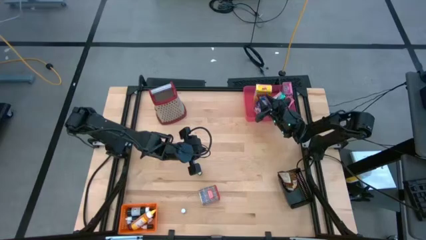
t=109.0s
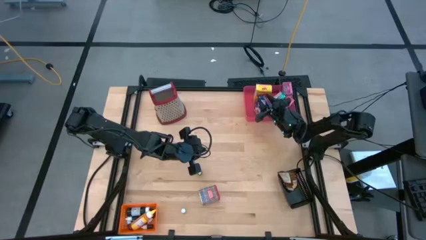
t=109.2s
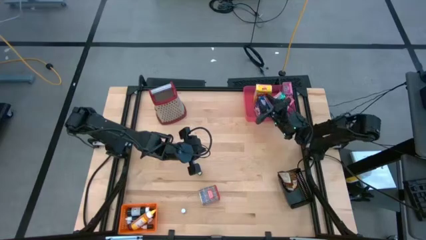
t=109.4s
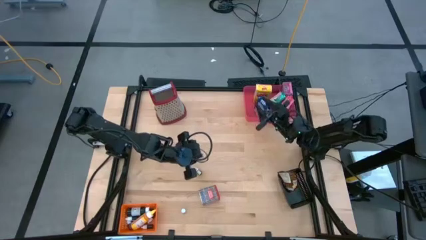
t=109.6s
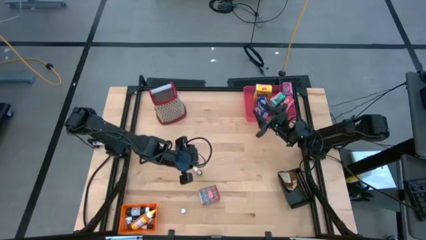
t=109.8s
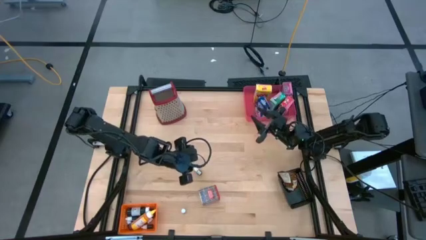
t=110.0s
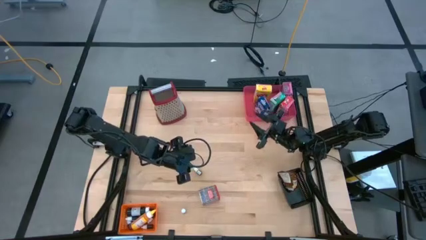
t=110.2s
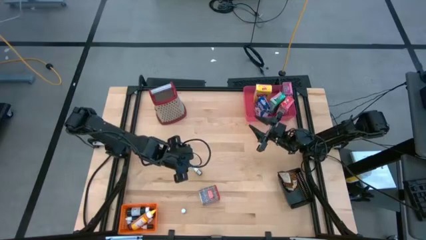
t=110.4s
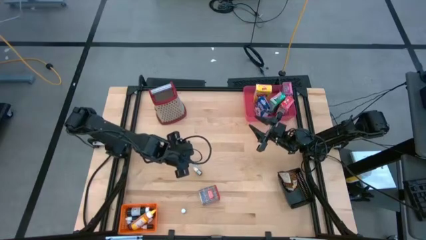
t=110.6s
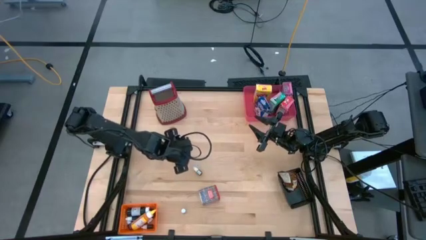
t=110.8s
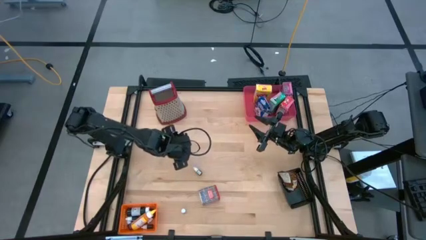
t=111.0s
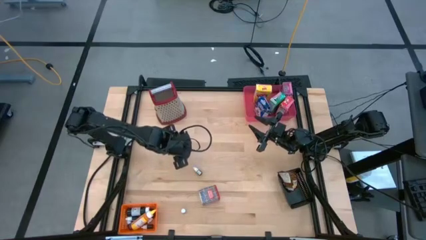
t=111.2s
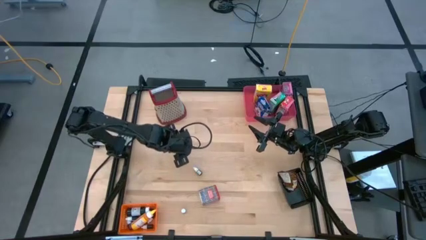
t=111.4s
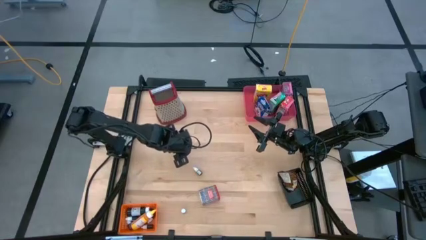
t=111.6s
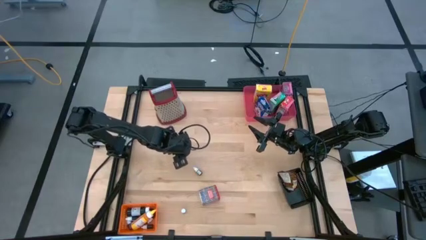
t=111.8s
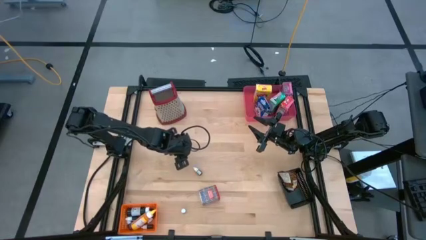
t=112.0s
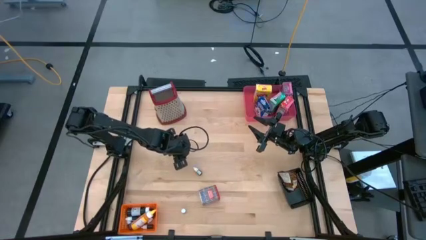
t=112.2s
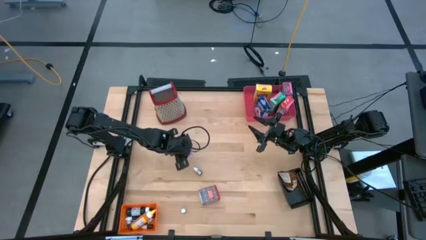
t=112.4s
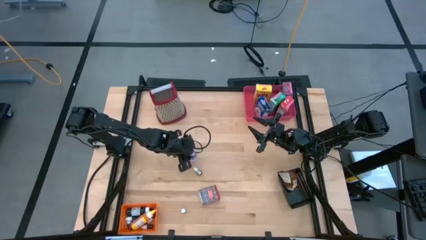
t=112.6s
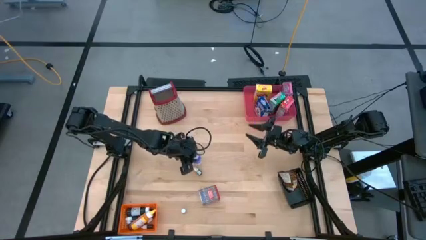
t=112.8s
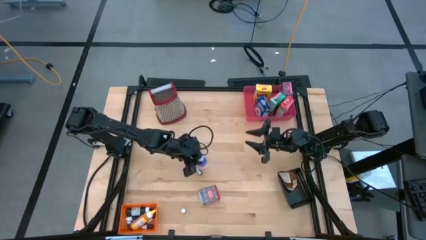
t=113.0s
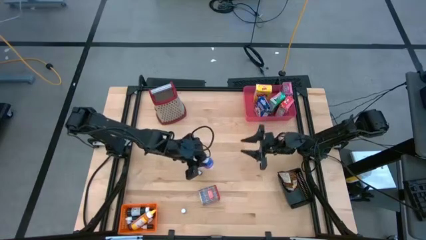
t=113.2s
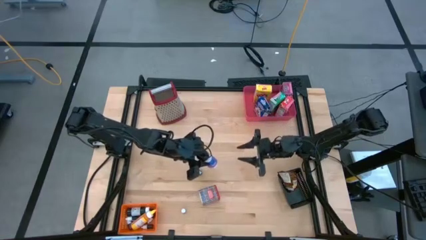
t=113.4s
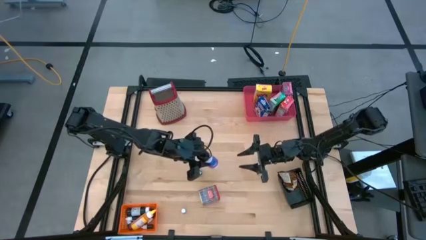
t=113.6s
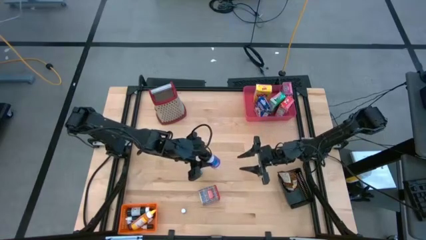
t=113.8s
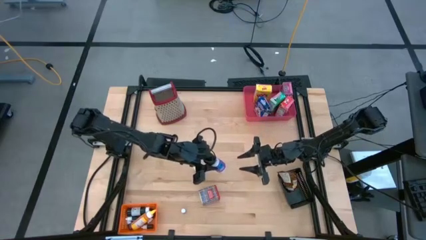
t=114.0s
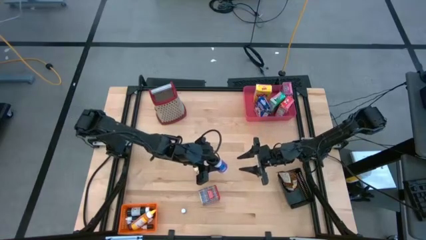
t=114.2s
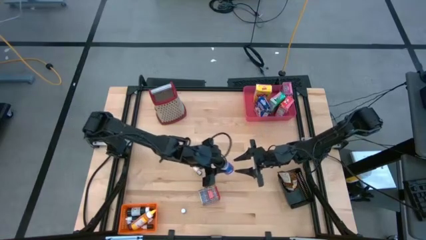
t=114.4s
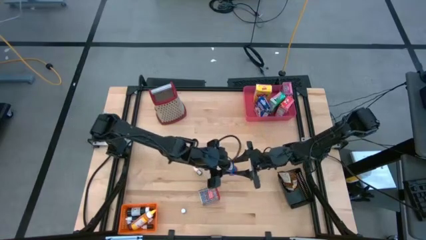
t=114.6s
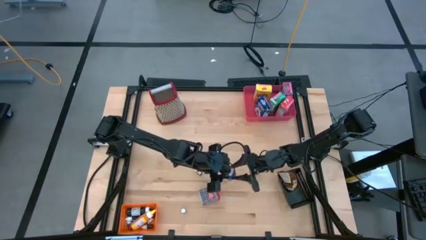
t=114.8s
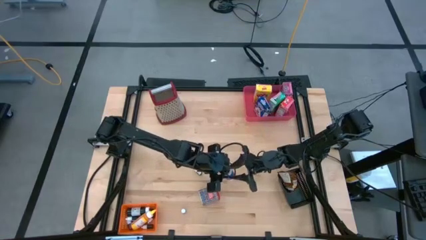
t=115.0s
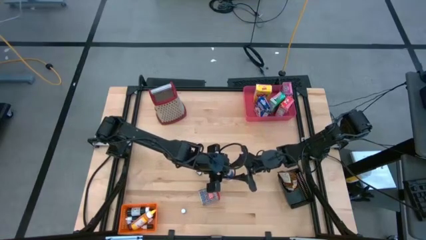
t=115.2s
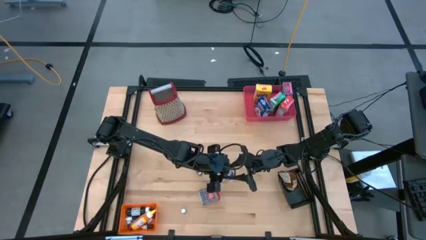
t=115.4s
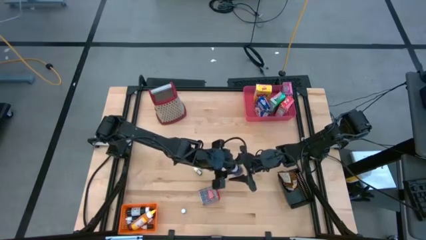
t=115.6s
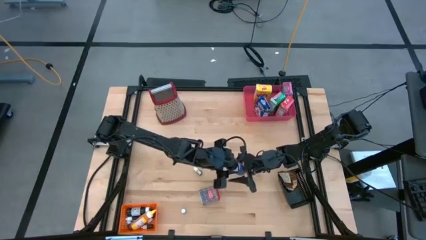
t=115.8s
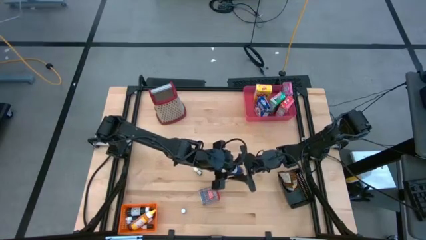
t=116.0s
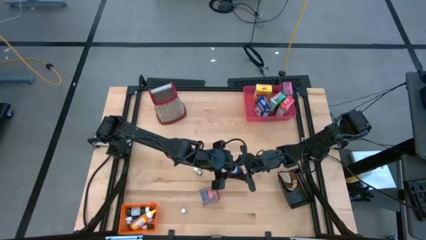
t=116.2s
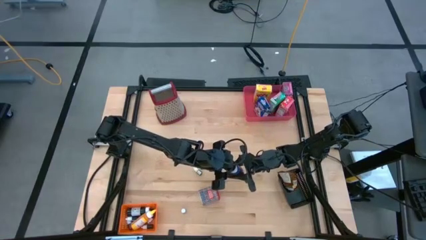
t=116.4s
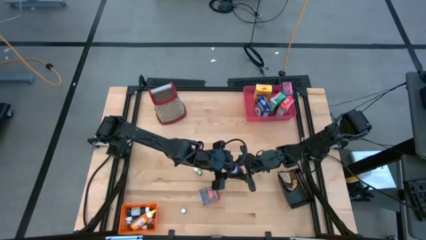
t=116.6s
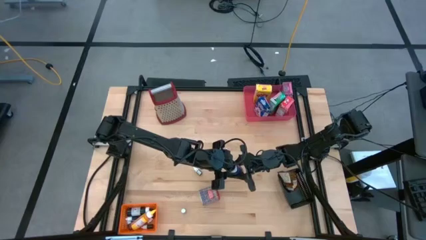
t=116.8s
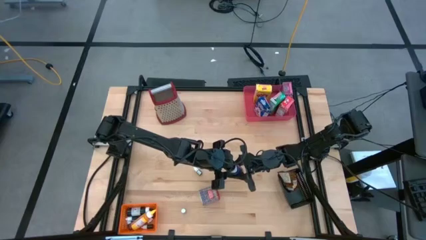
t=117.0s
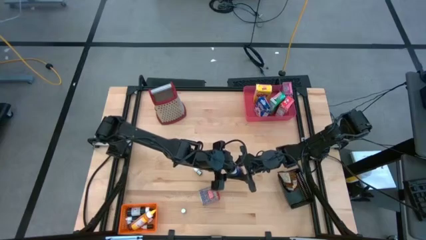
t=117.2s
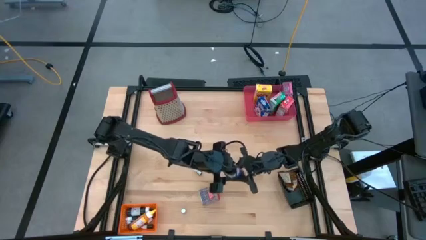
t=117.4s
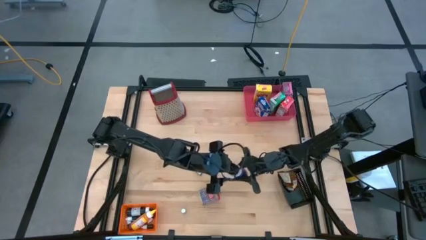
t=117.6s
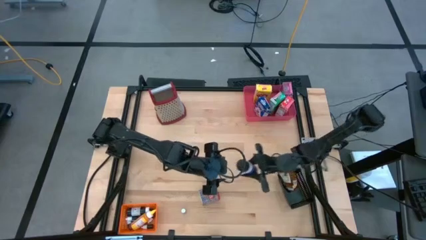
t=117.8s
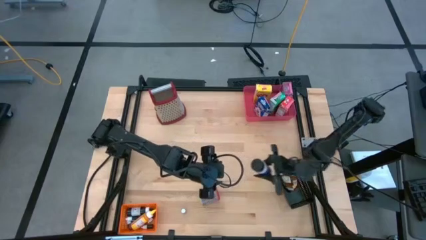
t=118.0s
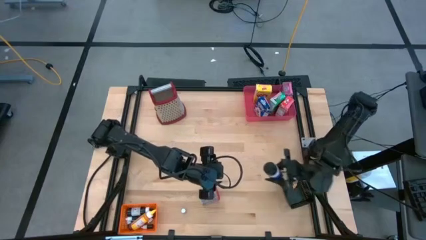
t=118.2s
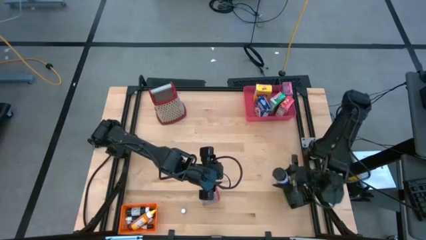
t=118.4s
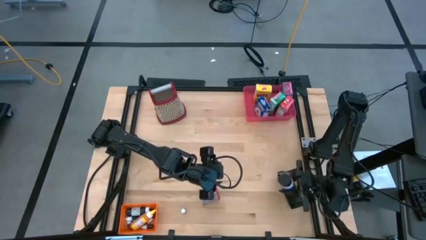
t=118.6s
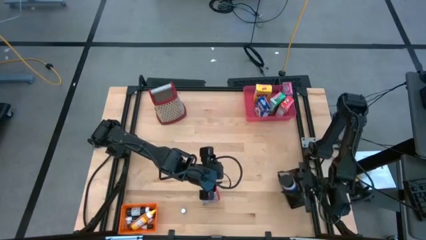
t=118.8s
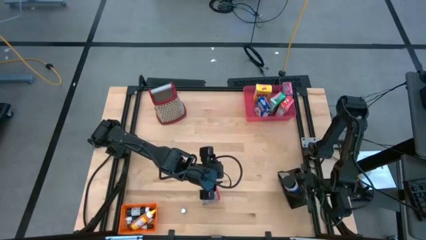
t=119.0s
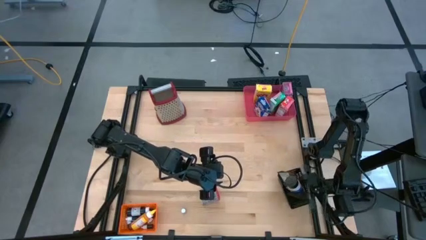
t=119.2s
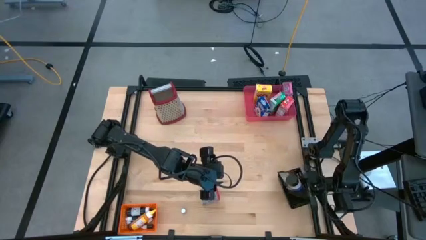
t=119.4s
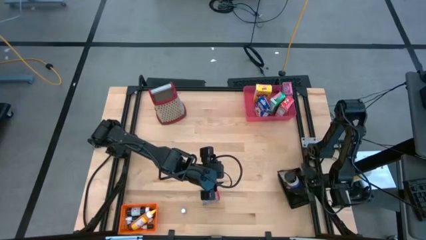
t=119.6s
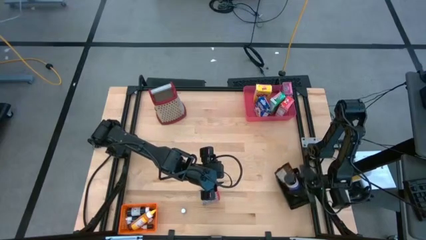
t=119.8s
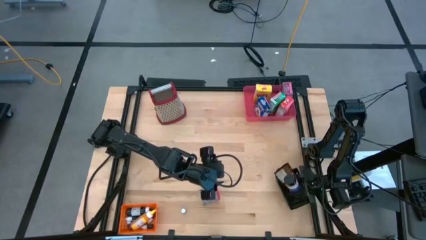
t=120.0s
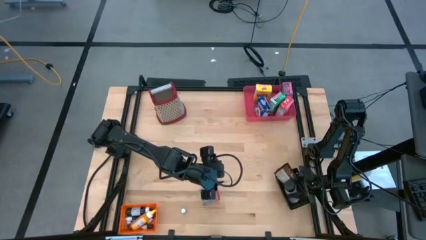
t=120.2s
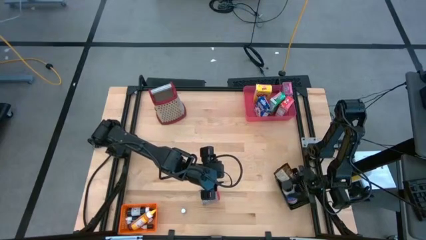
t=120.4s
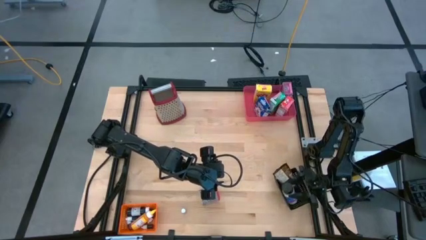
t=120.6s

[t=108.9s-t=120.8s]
Task: Pick & Place Kitchen Items
Put the violet seasoning bottle into the black bin

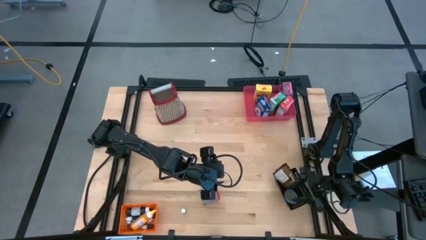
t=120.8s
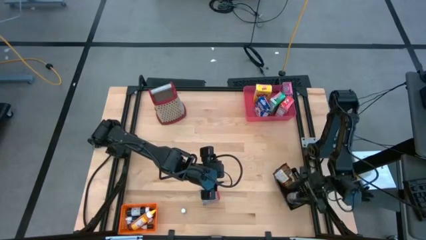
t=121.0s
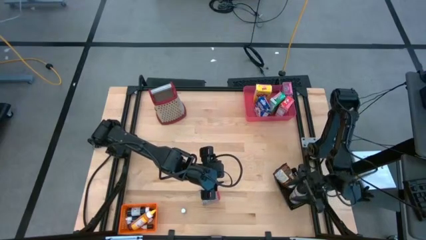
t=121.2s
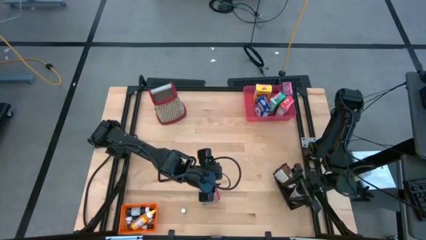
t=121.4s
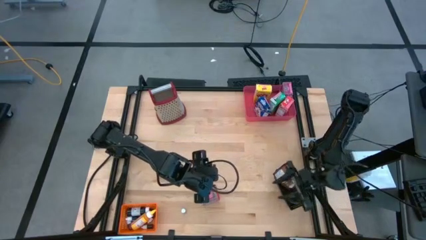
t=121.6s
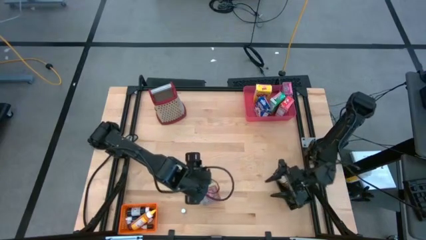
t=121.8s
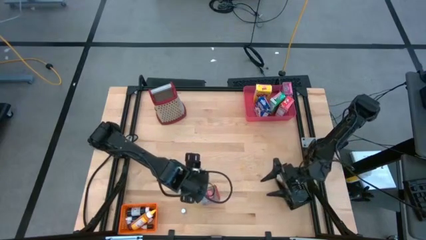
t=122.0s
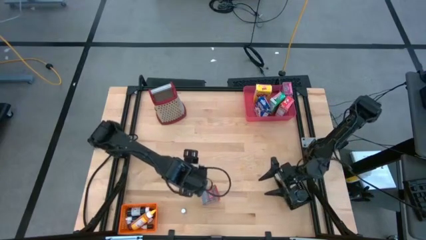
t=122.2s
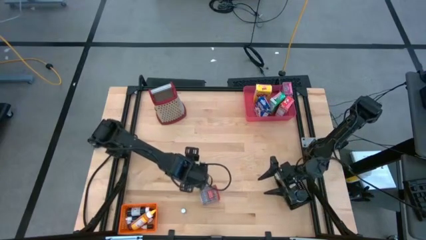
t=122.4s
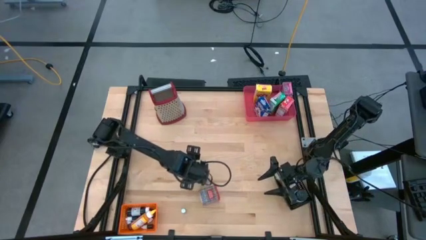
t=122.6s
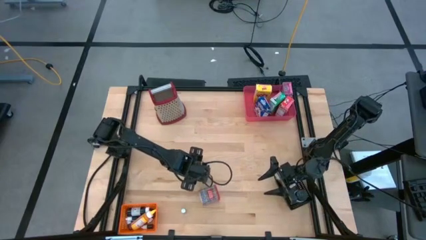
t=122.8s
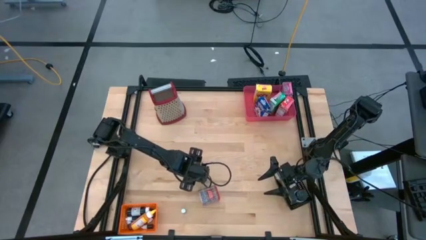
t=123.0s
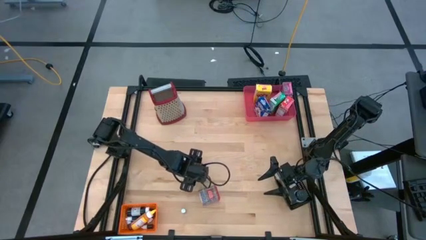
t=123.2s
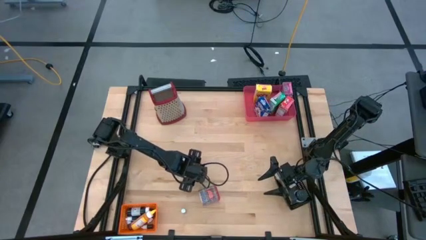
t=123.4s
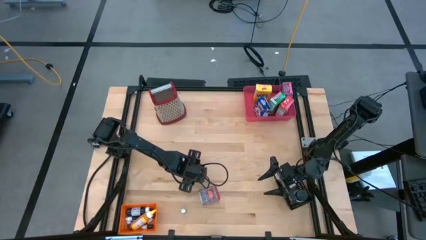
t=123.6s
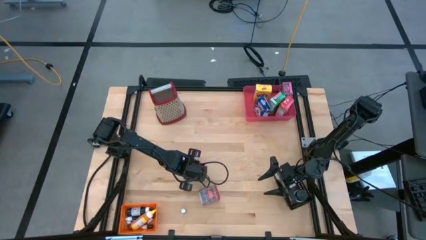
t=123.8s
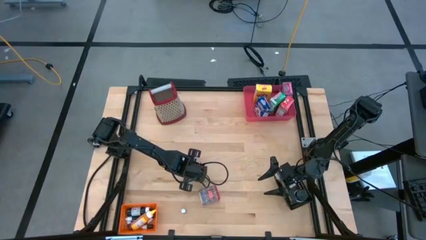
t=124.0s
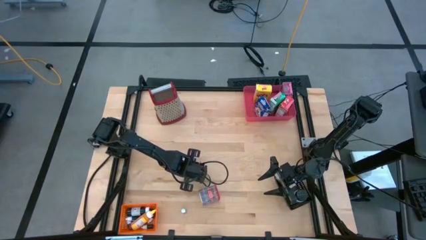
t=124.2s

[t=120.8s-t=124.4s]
Put the small black food coloring bottle into the orange bin

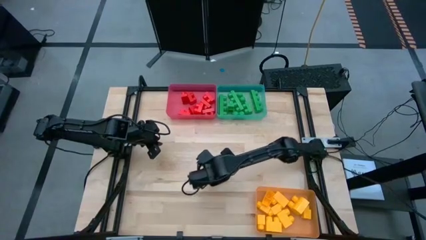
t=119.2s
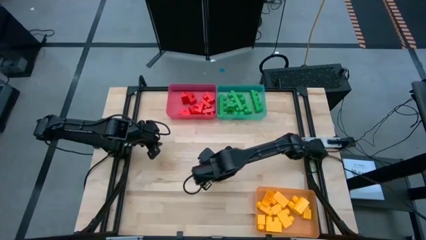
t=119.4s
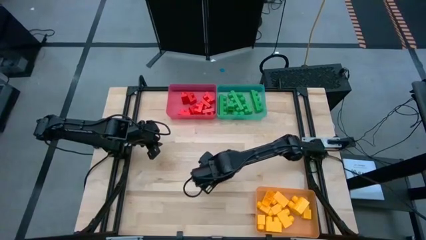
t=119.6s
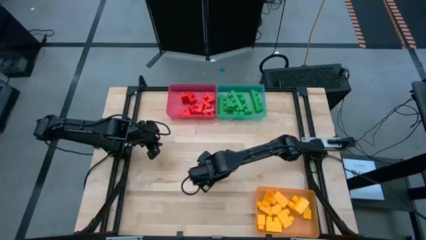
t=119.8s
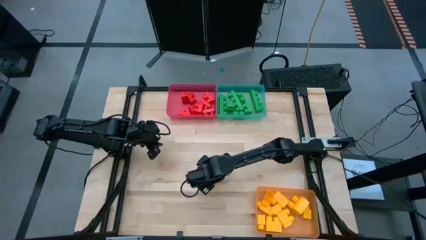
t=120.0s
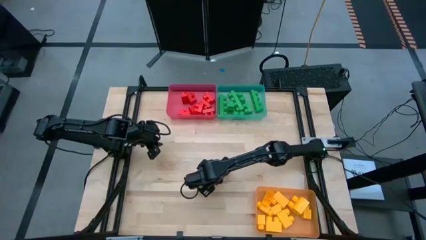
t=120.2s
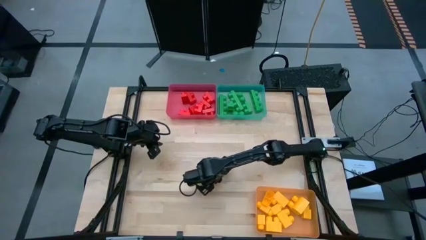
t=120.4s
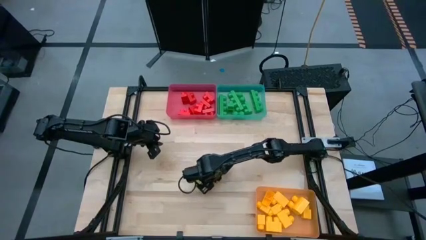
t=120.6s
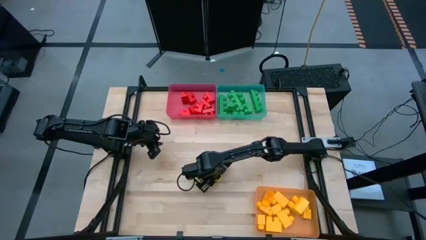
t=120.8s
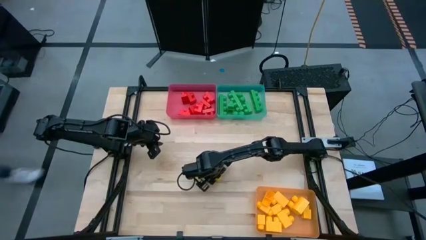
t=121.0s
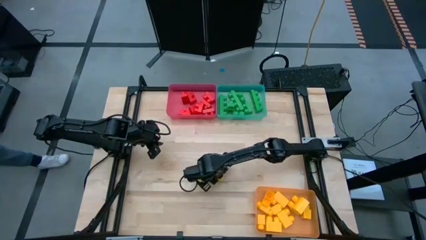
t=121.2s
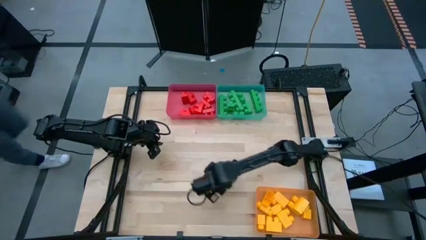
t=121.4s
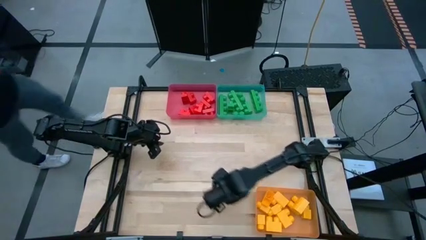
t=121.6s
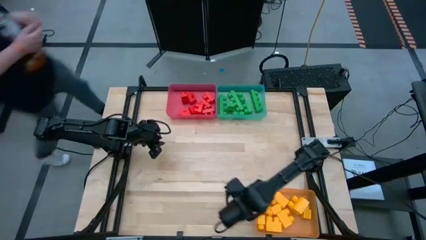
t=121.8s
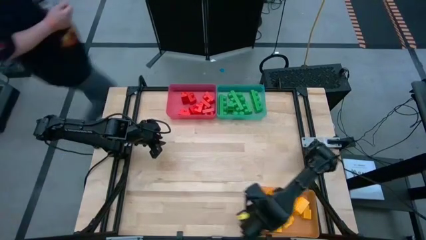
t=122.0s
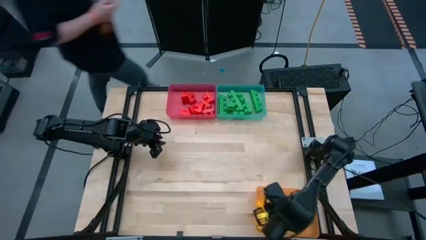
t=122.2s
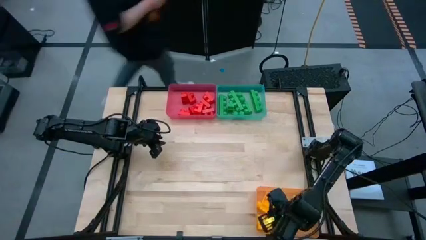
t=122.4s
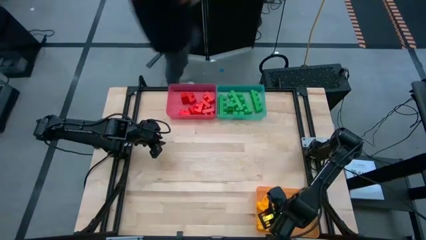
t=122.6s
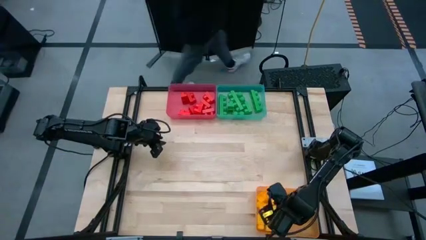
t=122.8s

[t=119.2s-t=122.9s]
Task: Sort blocks
Put the yellow game piece into the yellow bin
